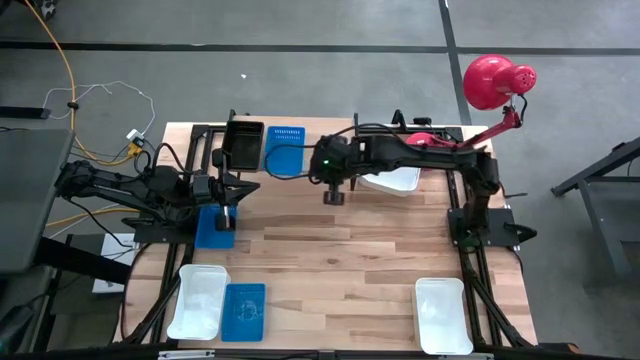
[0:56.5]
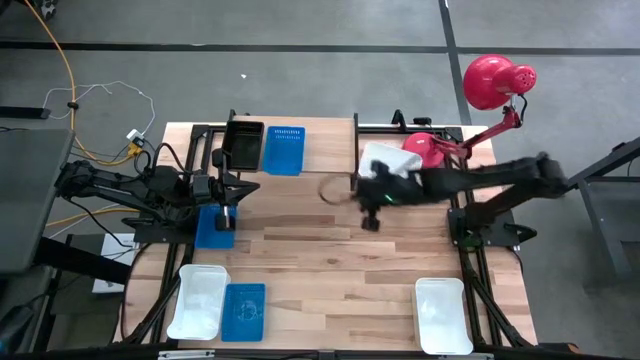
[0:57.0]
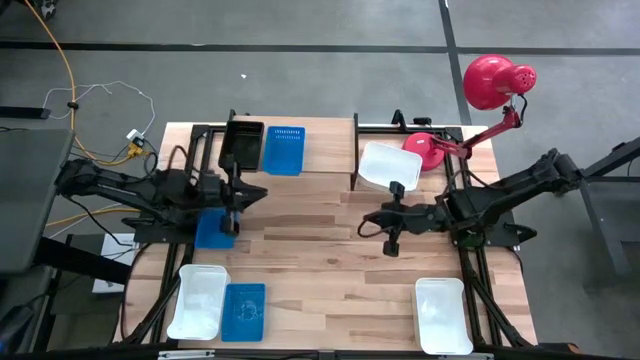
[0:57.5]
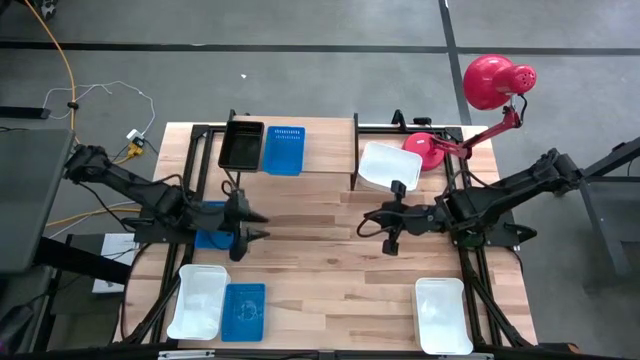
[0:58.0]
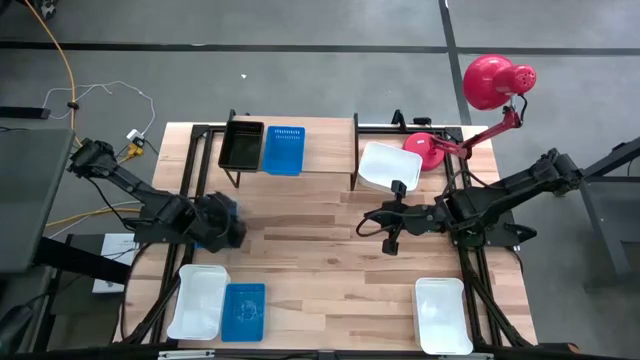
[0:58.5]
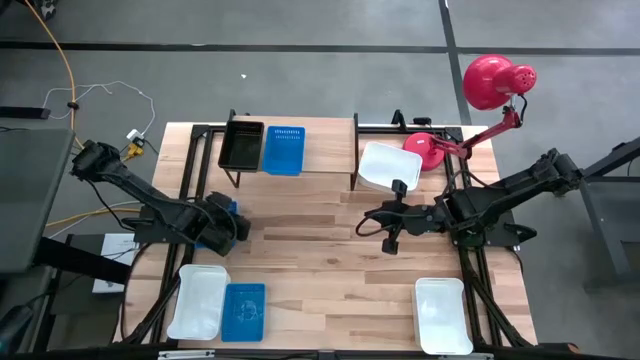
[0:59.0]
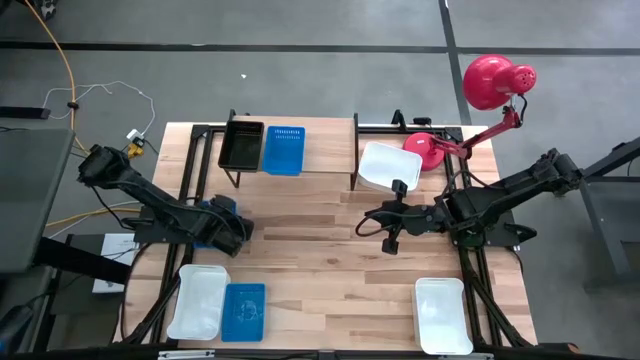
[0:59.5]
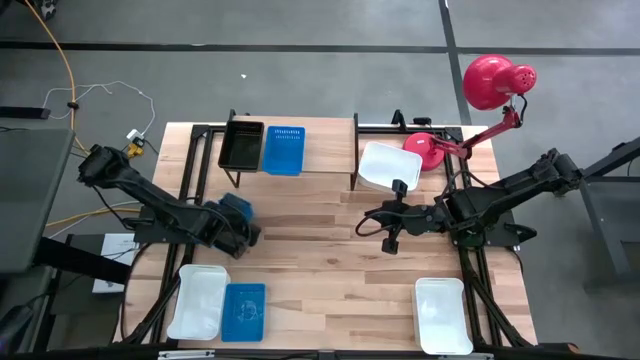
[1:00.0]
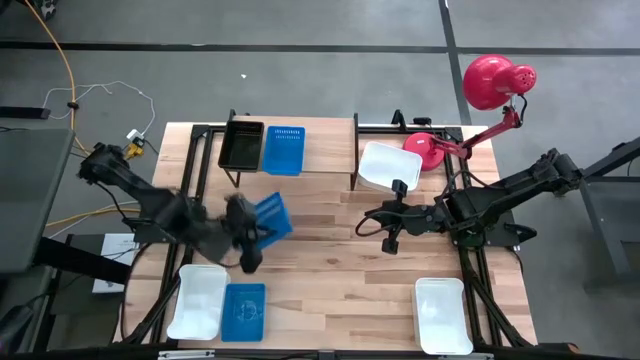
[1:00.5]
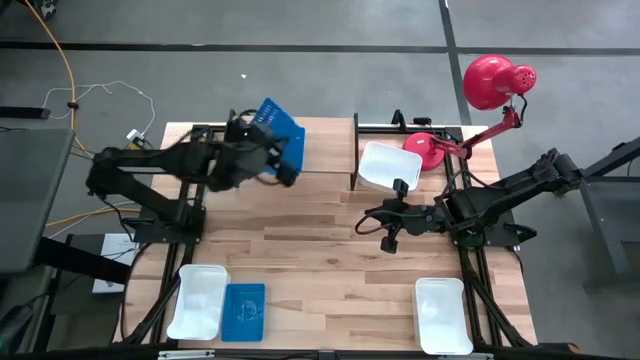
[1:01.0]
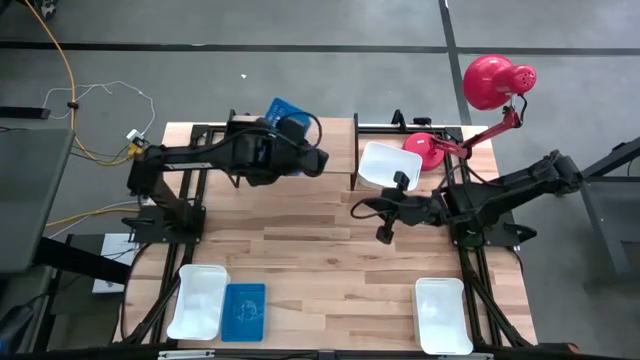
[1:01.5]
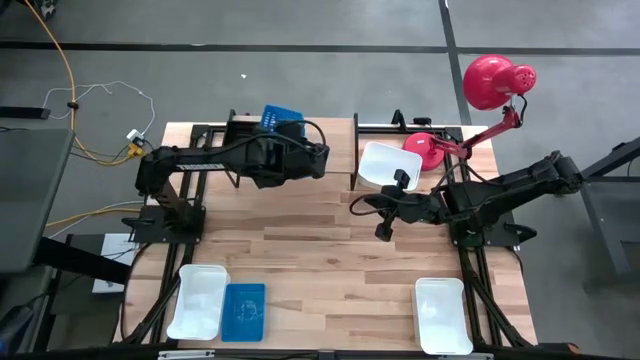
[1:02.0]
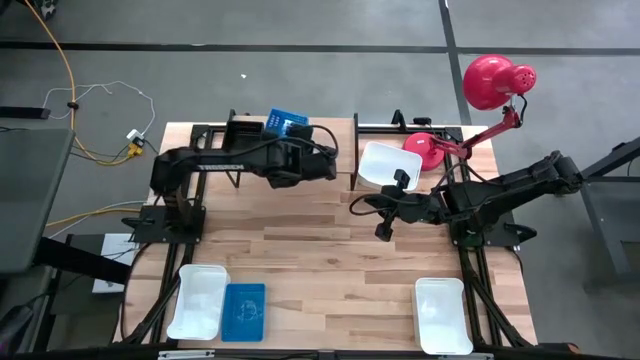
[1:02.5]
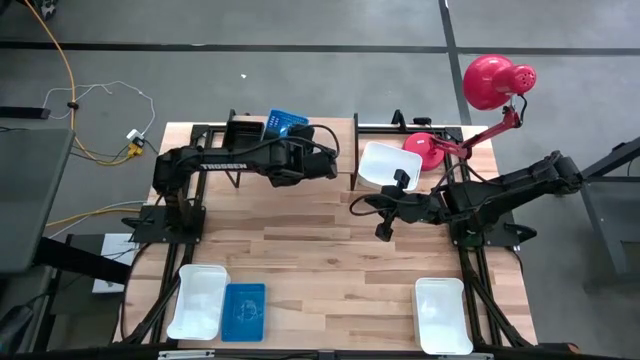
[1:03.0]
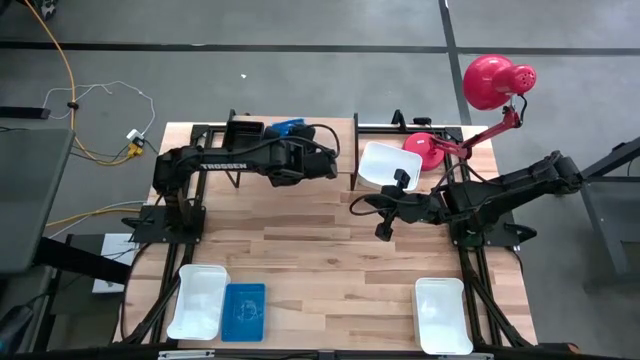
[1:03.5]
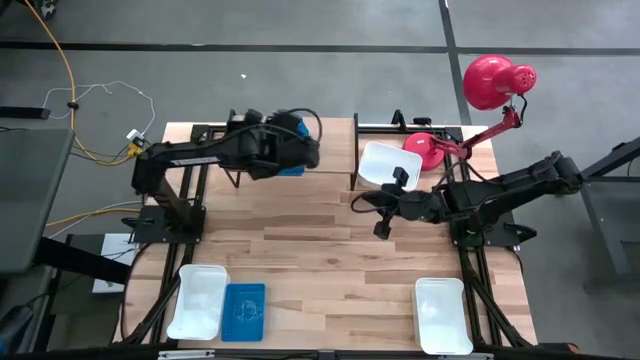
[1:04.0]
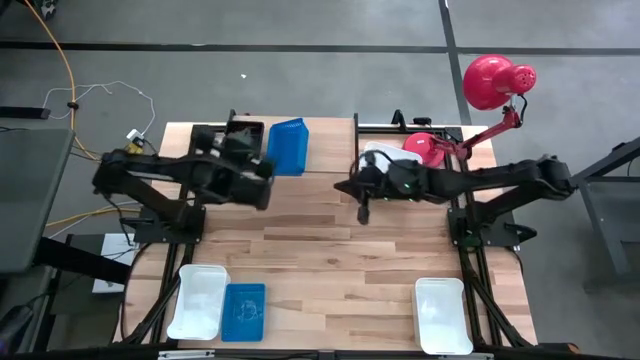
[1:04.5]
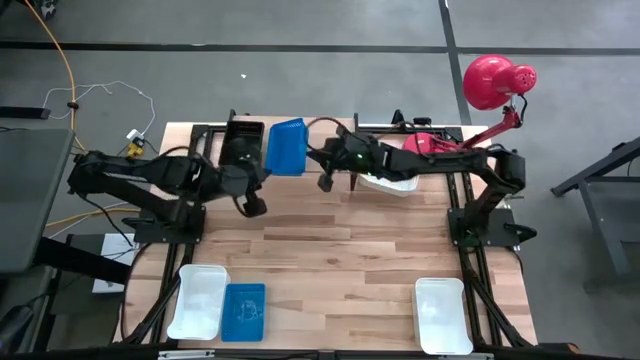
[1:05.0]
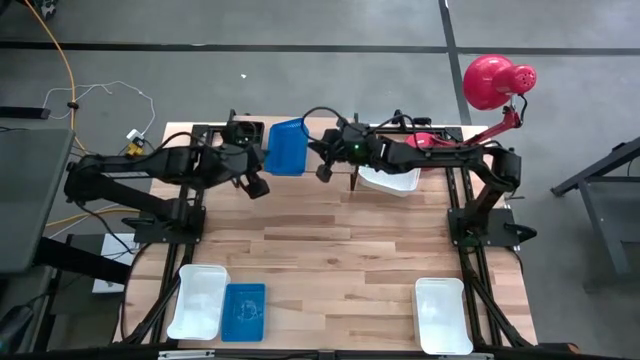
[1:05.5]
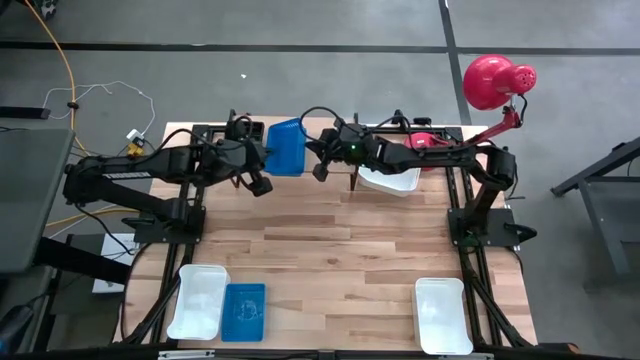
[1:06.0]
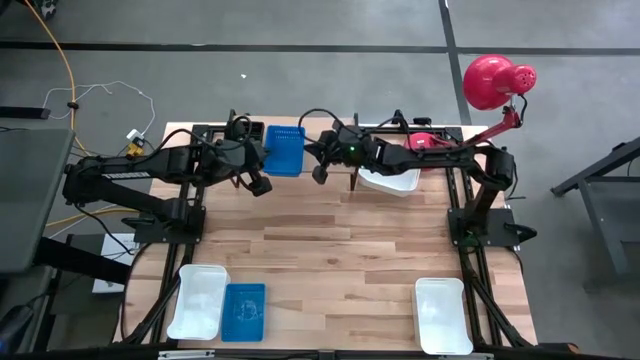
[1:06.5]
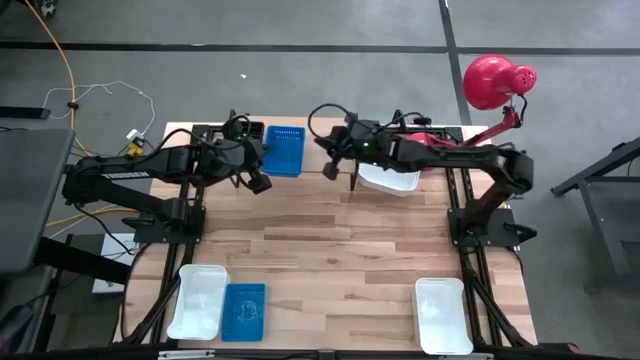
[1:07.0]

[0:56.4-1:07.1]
Task: Stack baskets on shelf by color
Stack the top left blue bin on the blue bin on the shelf

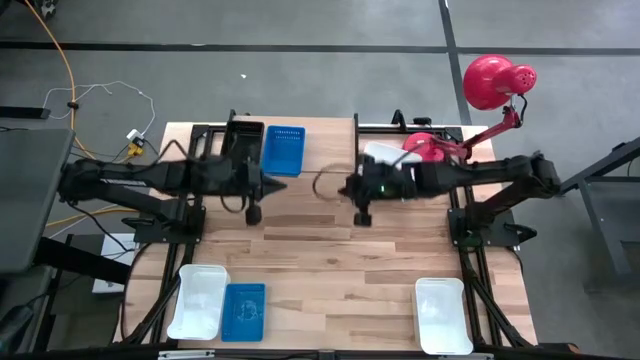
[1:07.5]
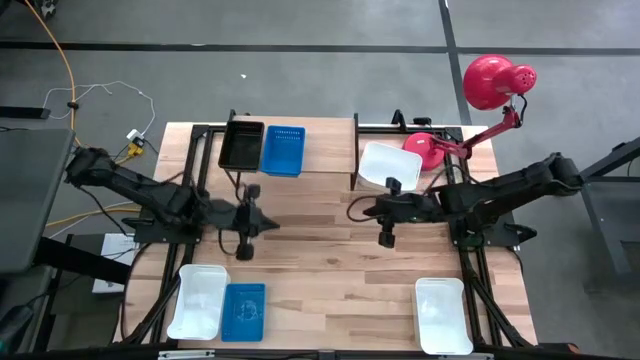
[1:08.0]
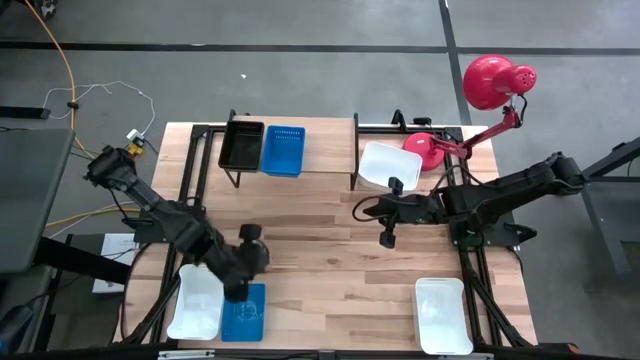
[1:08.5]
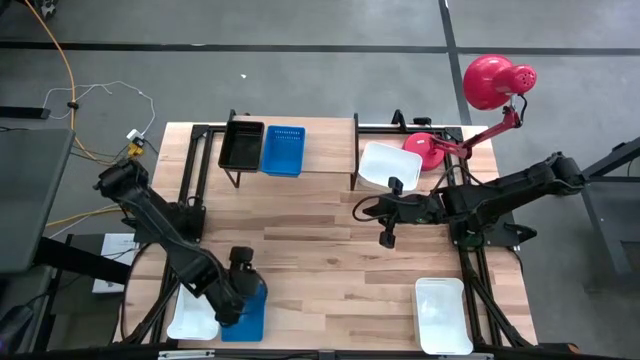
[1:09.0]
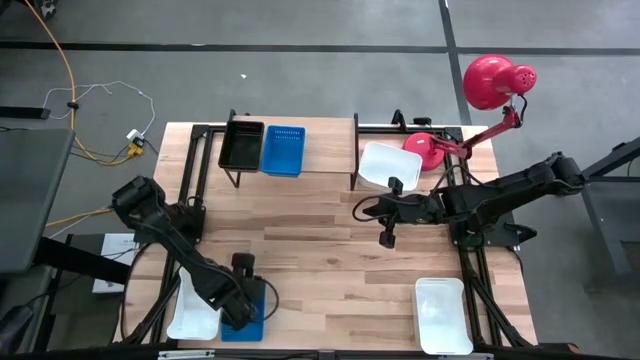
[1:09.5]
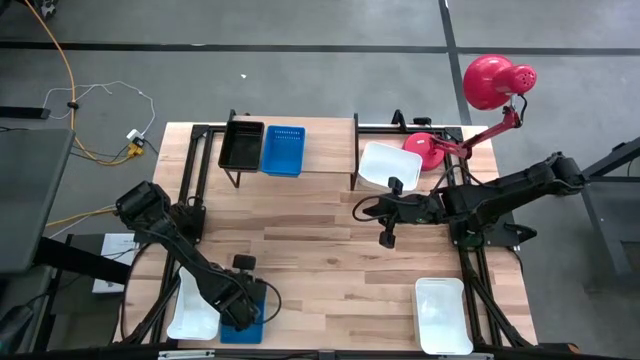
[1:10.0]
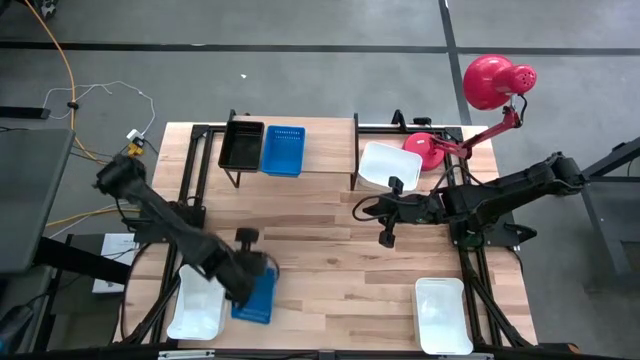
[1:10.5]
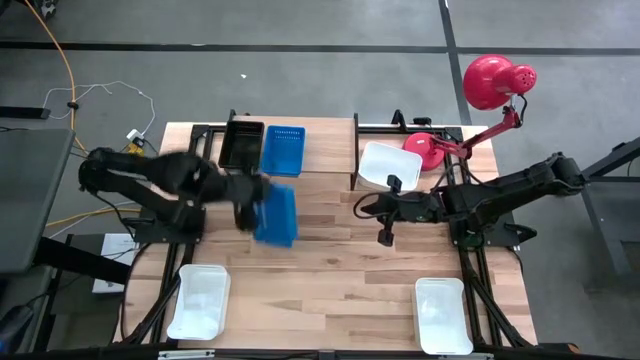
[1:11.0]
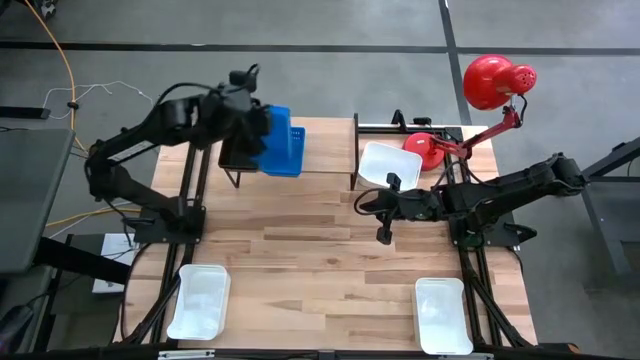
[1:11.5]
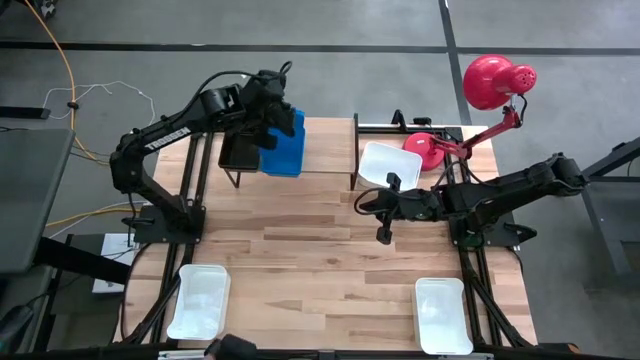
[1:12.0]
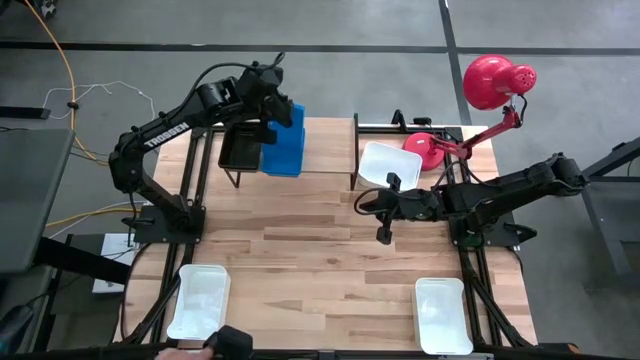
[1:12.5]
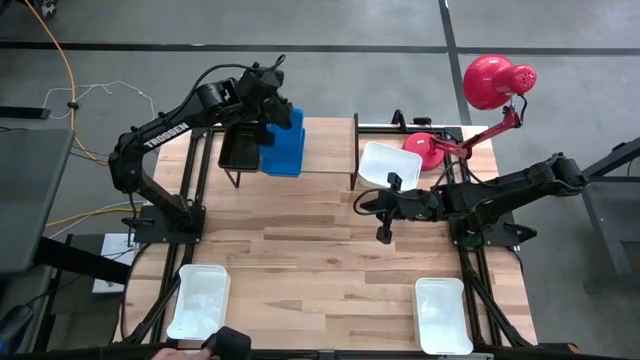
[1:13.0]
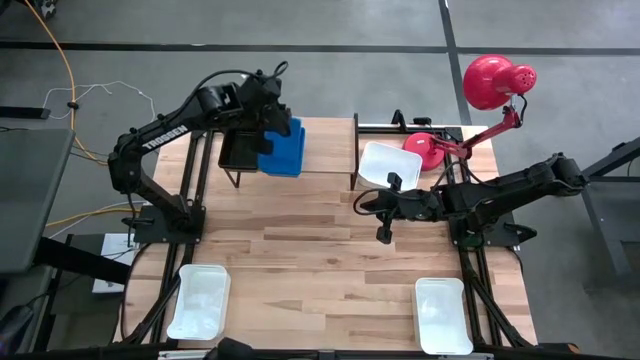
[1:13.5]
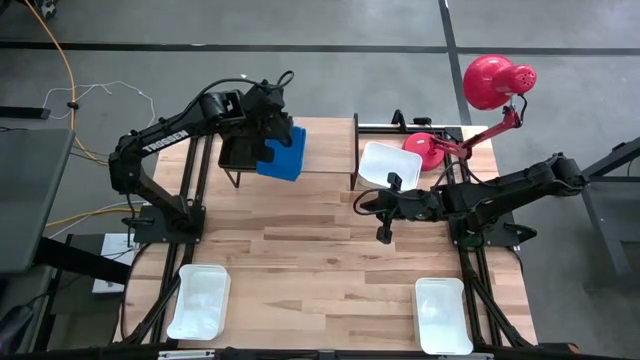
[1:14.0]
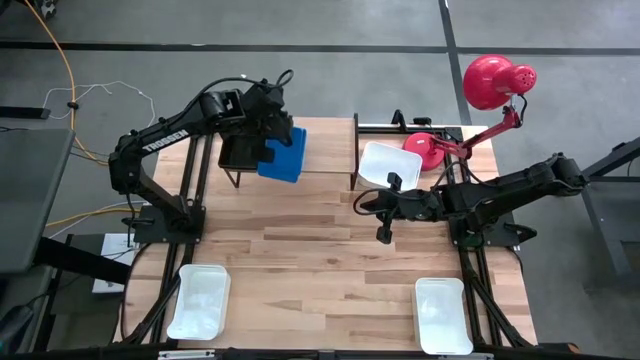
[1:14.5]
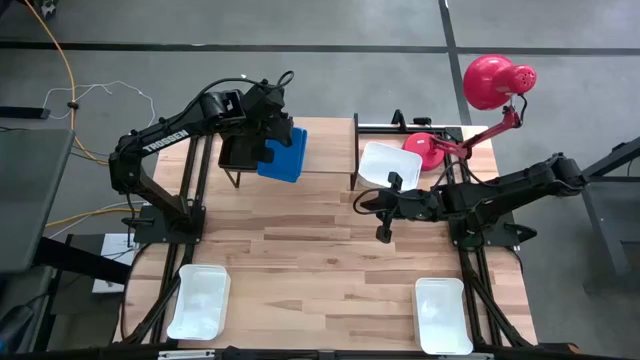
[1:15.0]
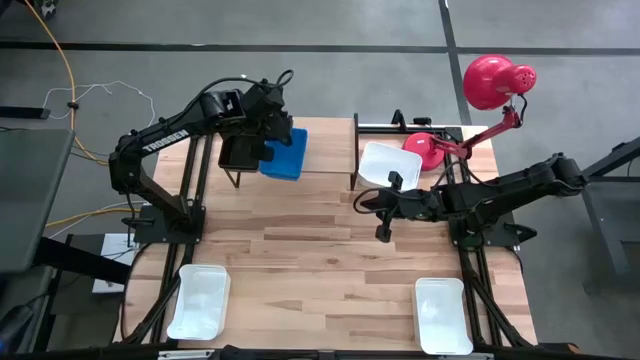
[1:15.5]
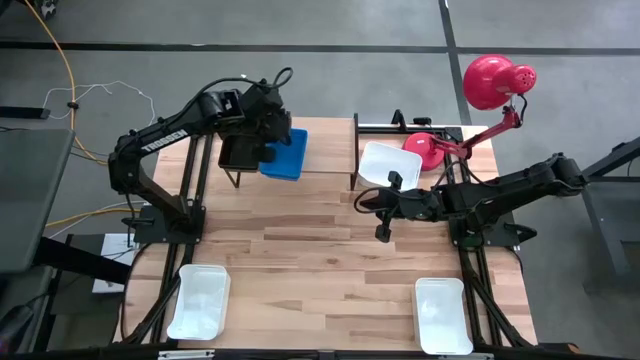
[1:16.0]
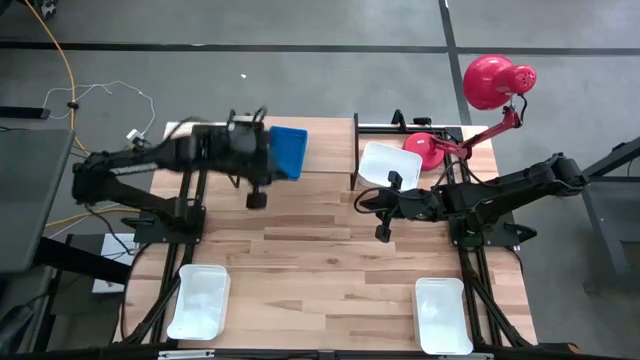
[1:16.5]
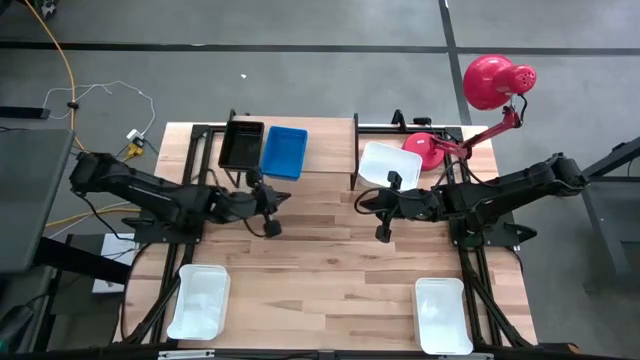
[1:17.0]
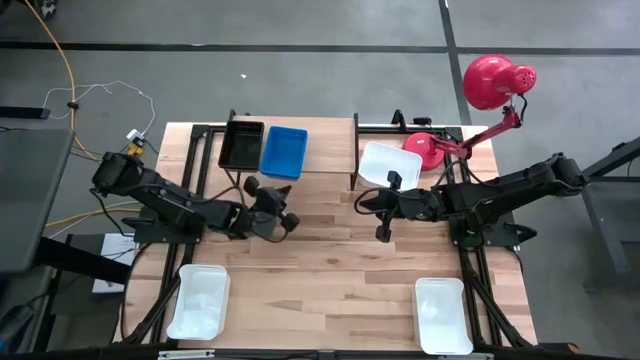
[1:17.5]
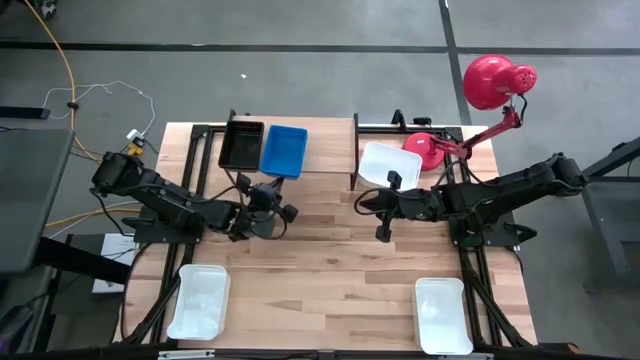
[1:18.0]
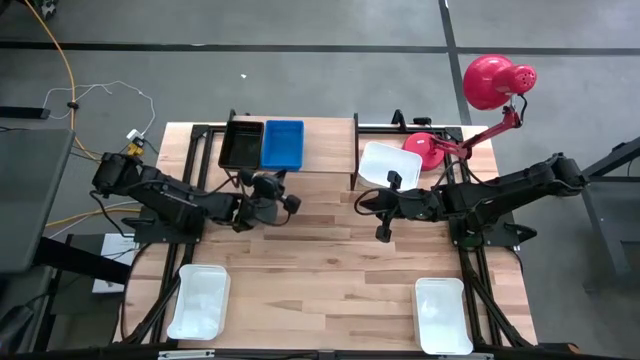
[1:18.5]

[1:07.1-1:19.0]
Stack the blue bin on the blue bin on the shelf
